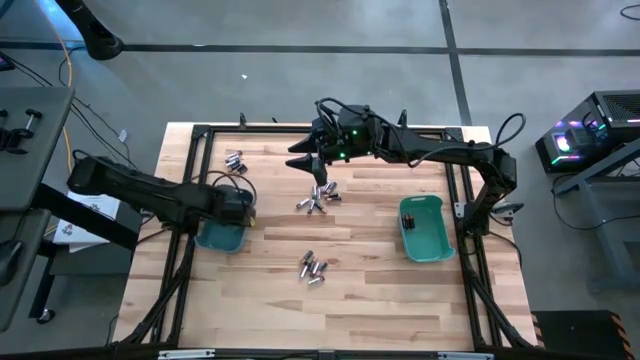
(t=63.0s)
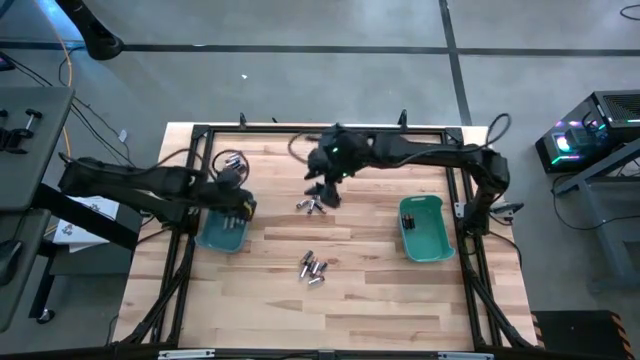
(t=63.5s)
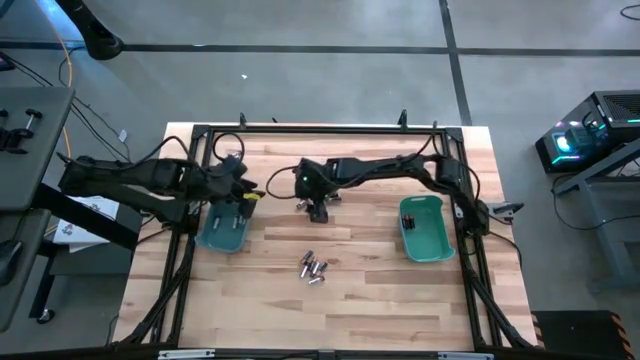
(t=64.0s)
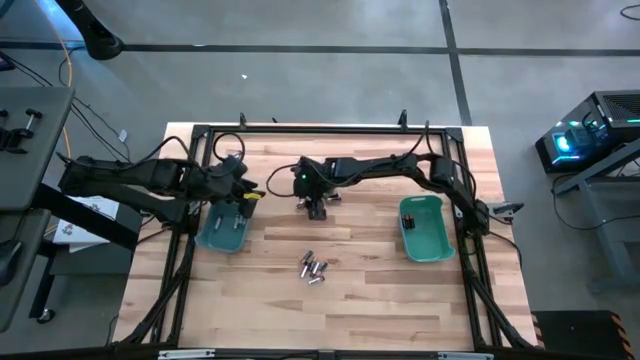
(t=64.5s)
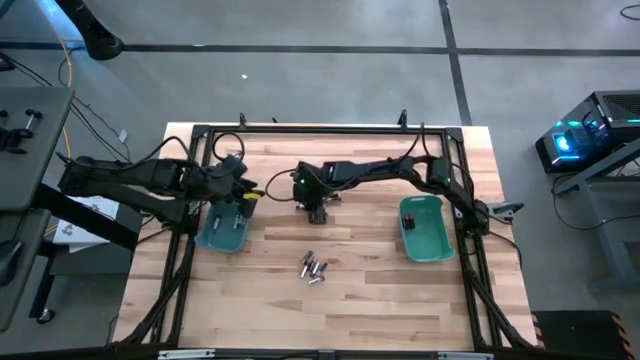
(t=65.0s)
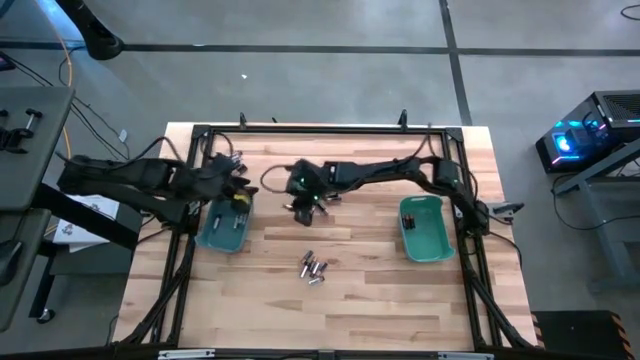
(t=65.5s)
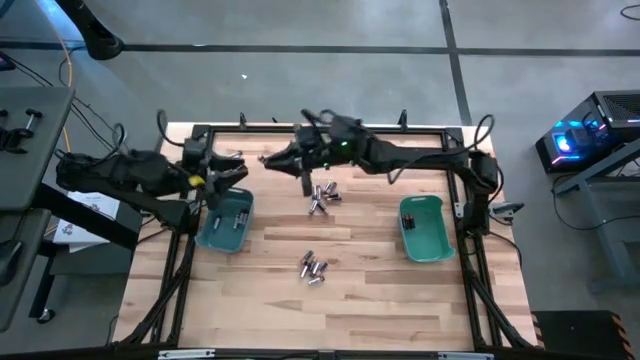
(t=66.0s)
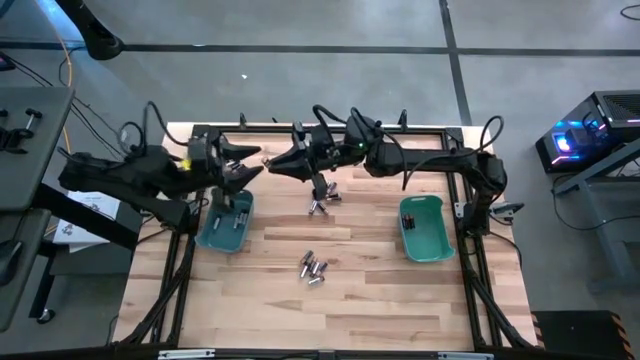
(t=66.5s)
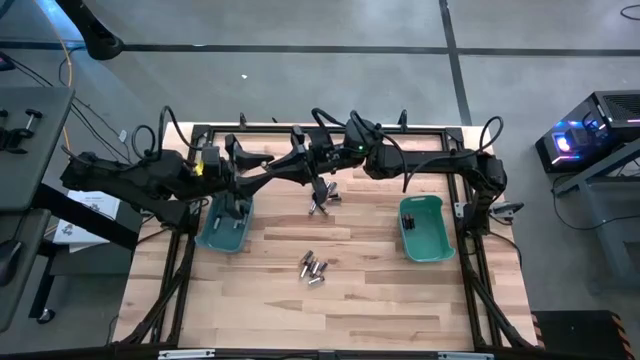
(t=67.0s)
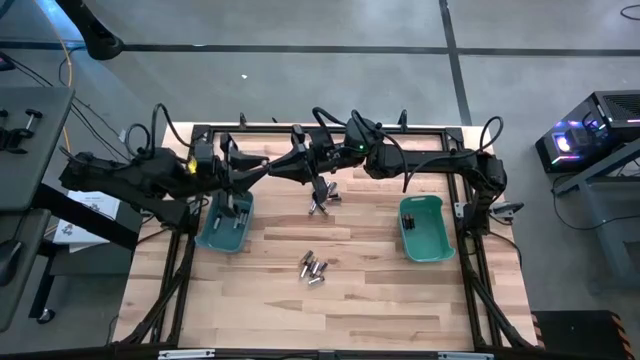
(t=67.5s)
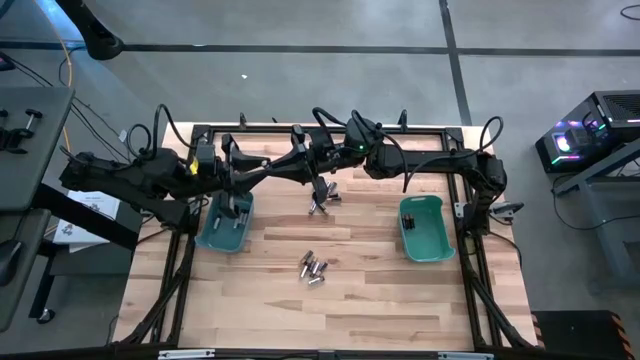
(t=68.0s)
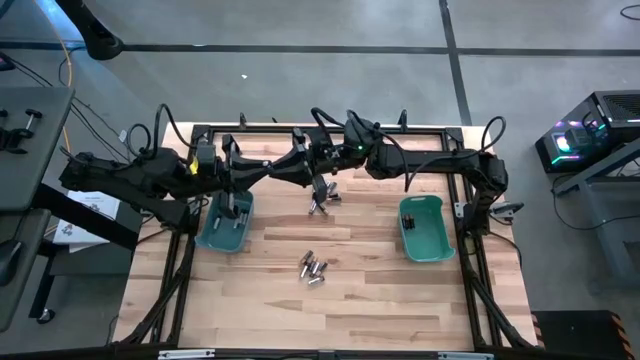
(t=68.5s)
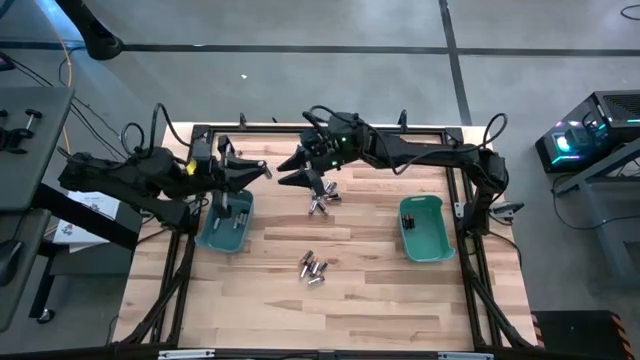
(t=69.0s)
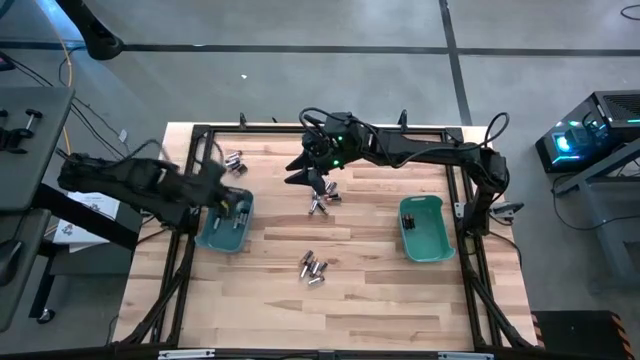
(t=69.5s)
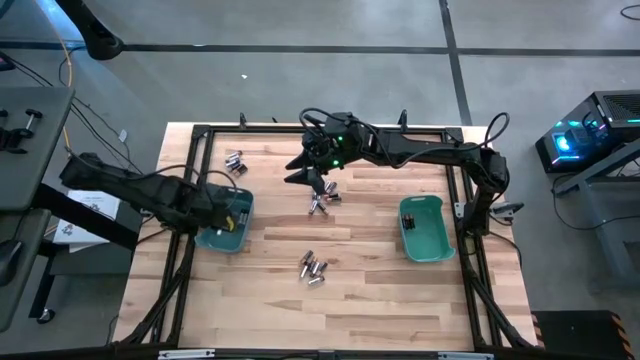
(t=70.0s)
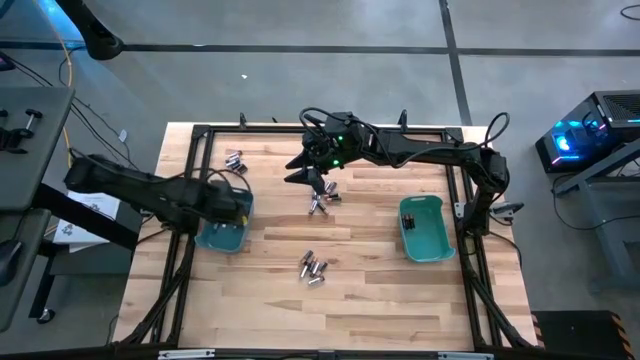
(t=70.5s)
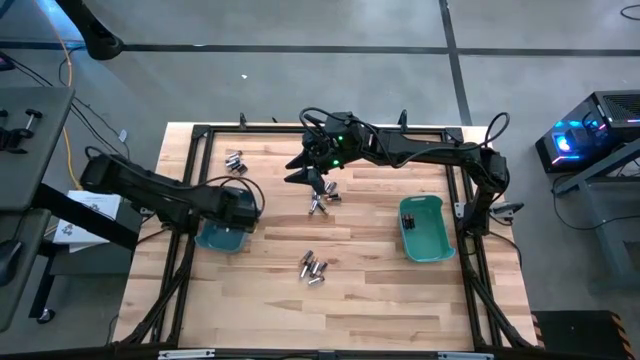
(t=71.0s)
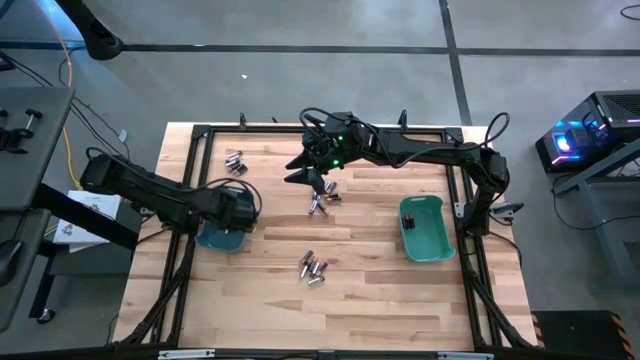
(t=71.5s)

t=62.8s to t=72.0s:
Task: Sort batteries
Put the silver battery into the blue bin

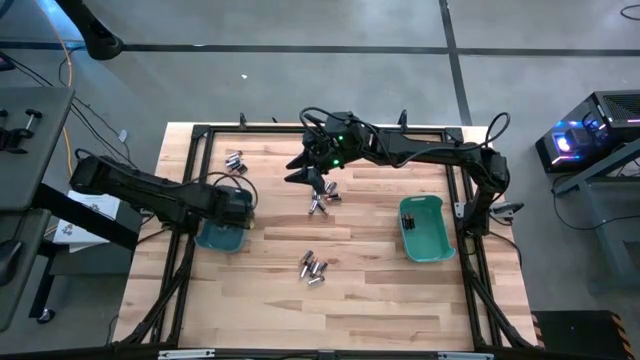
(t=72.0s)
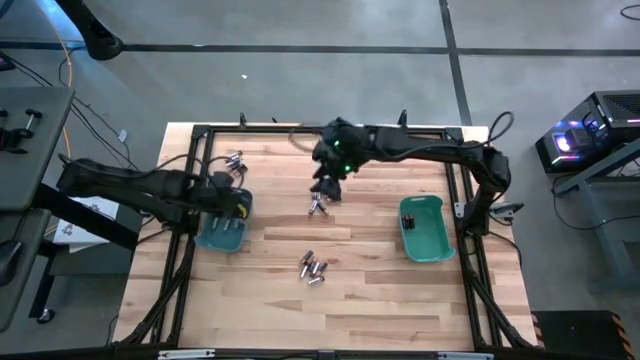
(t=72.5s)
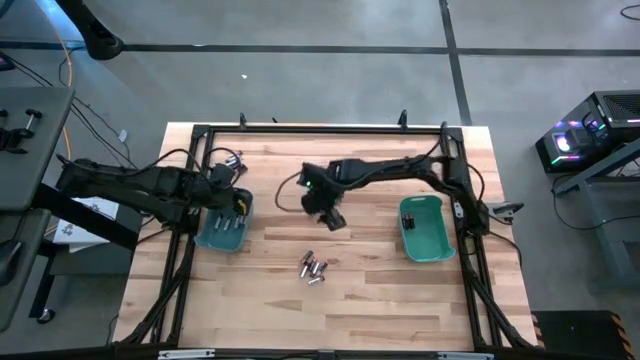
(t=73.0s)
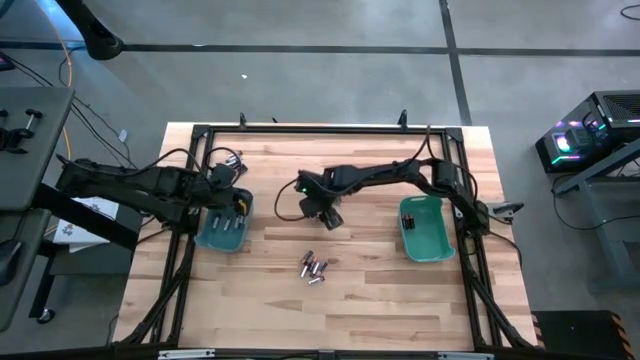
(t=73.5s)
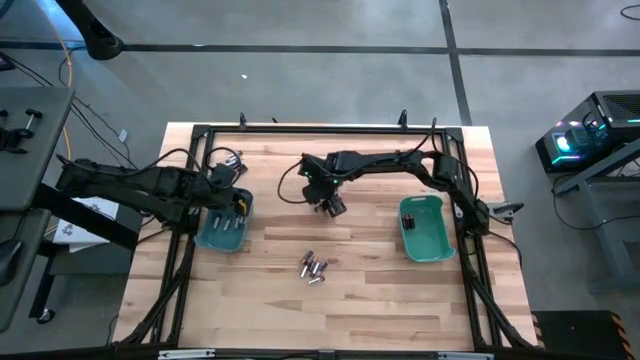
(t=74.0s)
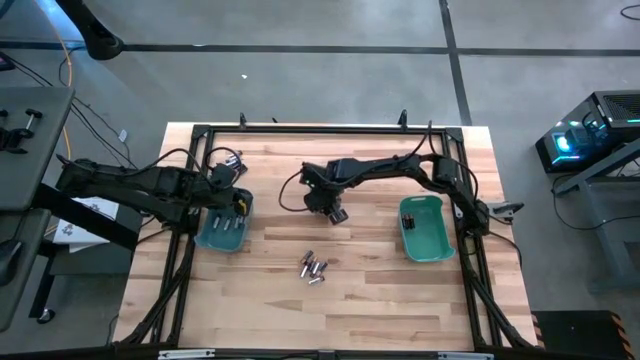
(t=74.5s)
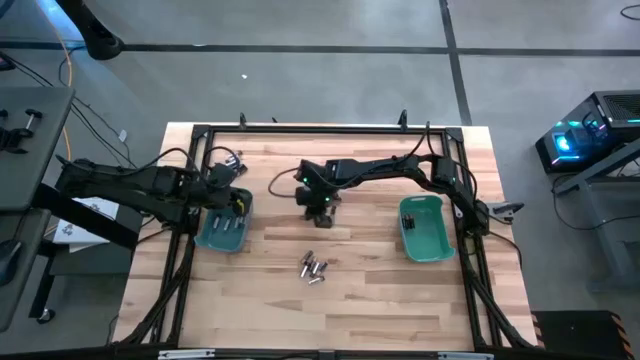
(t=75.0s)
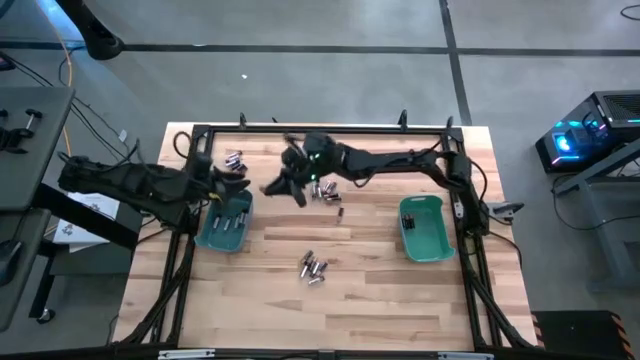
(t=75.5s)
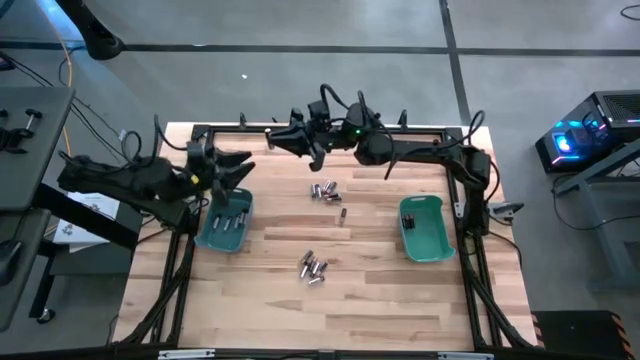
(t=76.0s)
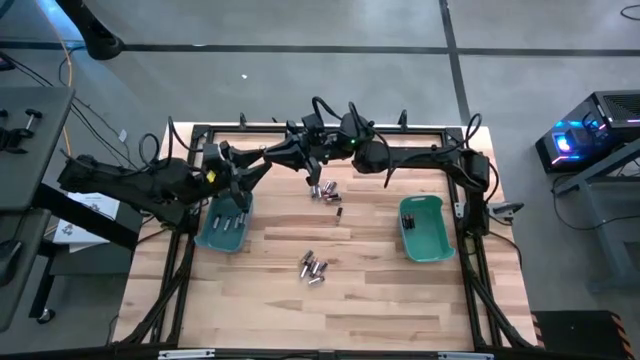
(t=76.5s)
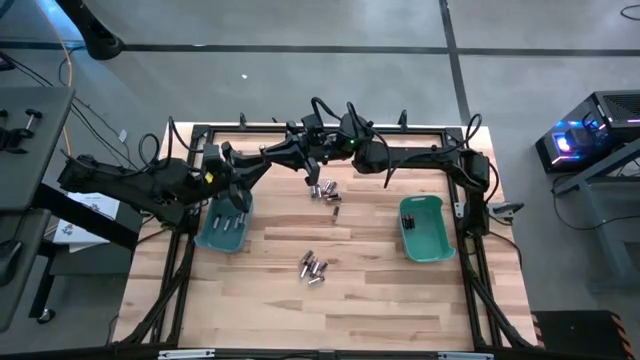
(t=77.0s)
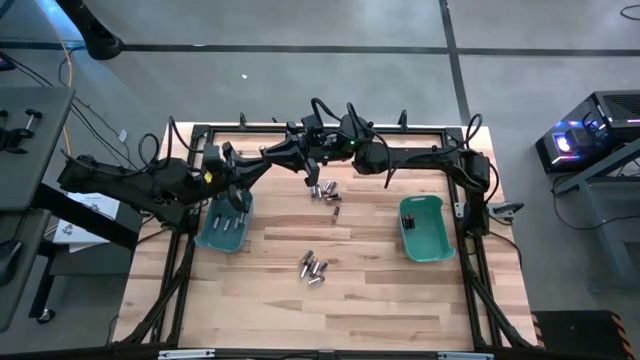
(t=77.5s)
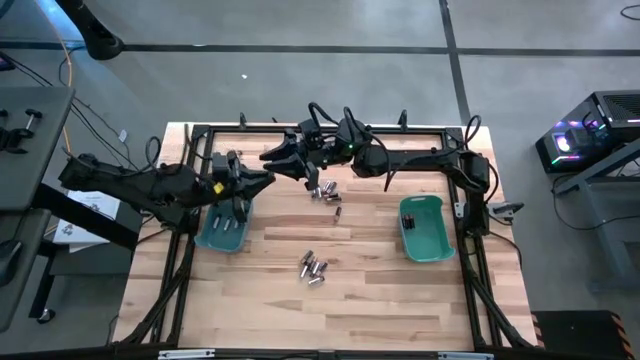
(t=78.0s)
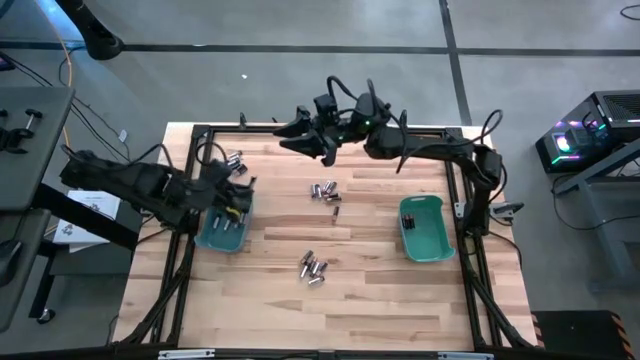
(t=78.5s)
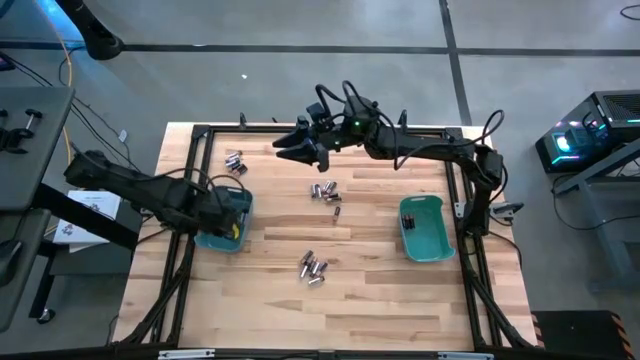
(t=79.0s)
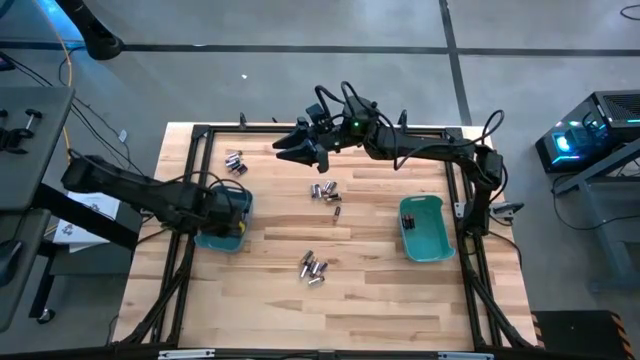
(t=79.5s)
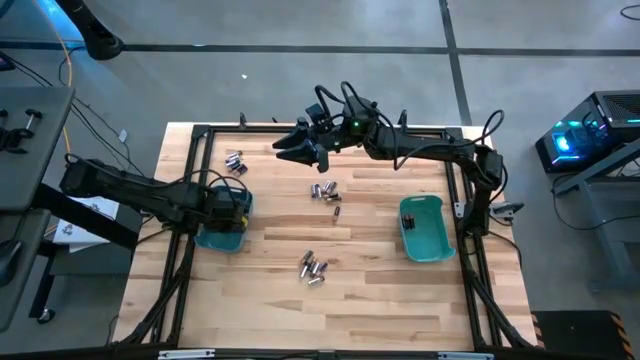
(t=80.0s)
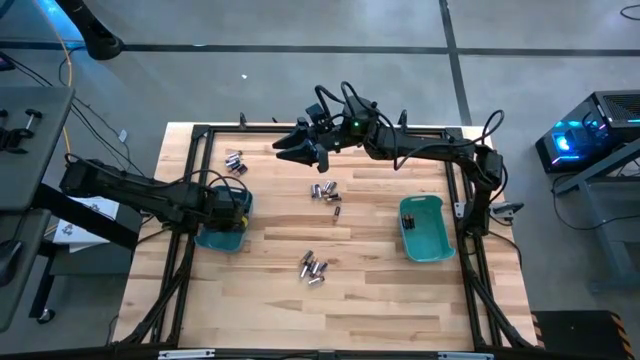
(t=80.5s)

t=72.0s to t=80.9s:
Put the silver battery into the blue bin

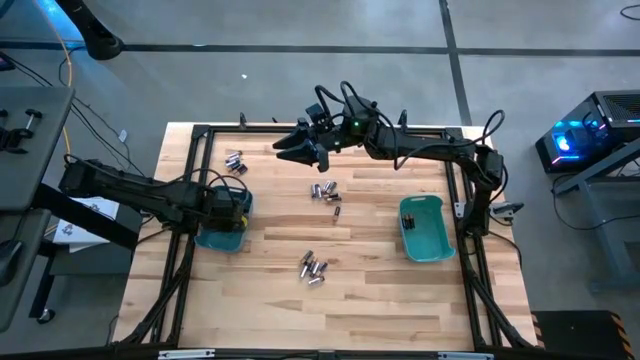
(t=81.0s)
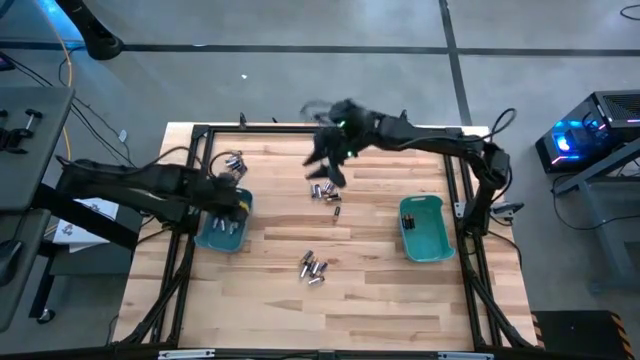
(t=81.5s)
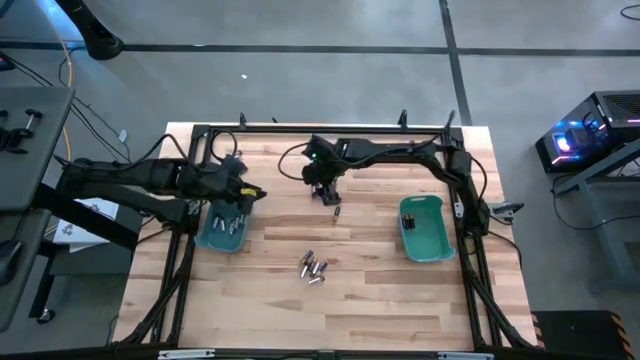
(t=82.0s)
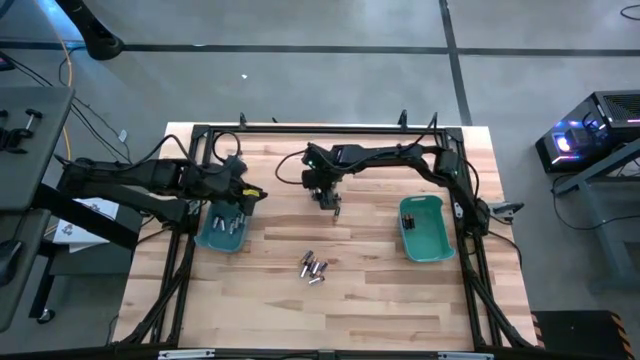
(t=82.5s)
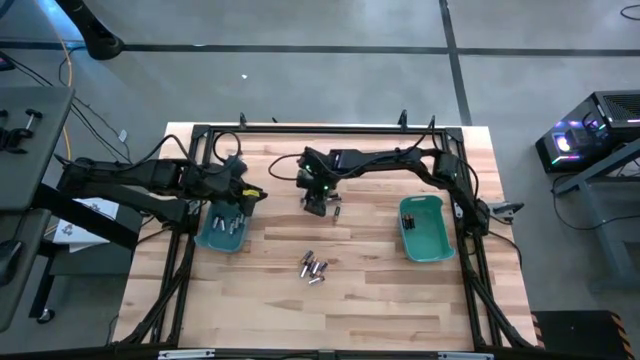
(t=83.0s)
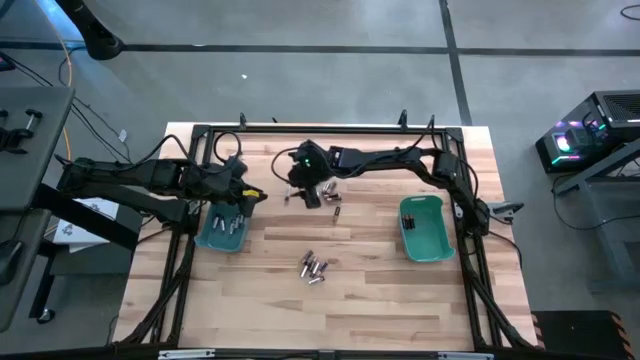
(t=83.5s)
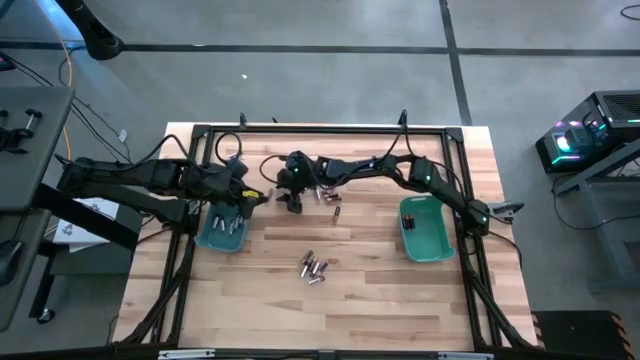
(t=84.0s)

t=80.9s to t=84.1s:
Put the silver battery into the blue bin
